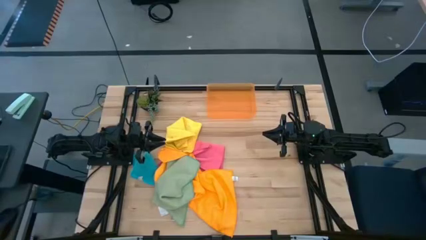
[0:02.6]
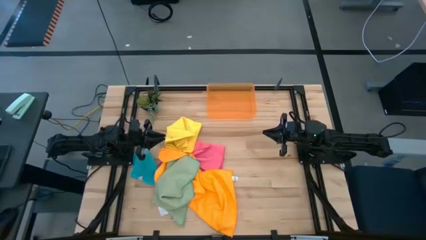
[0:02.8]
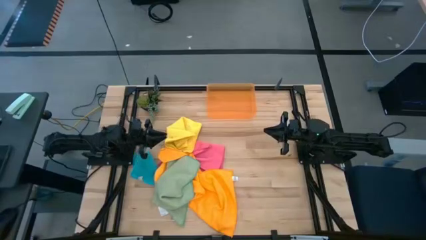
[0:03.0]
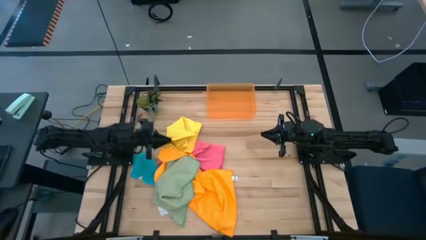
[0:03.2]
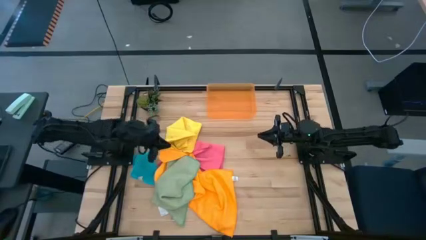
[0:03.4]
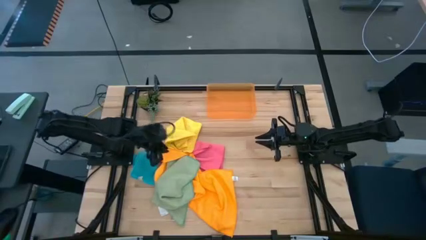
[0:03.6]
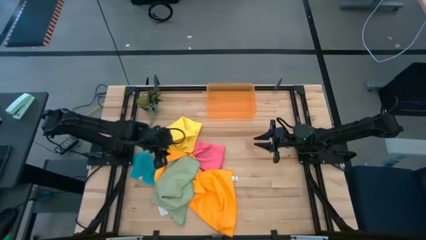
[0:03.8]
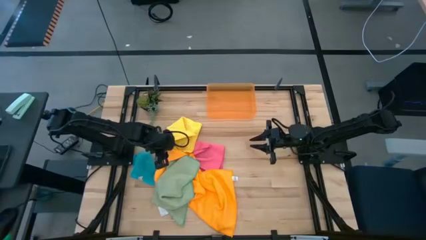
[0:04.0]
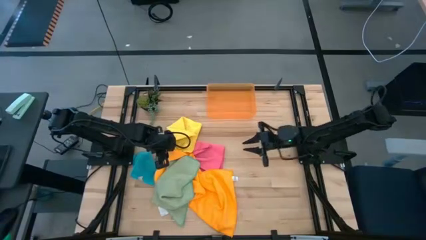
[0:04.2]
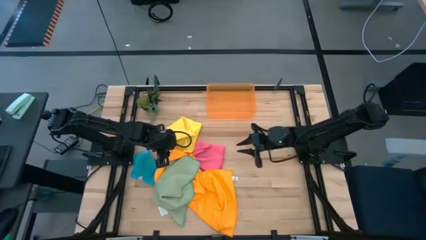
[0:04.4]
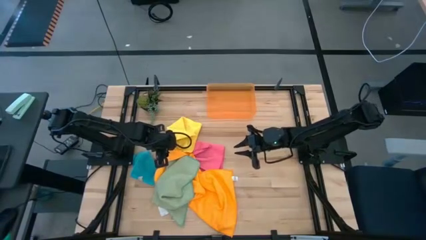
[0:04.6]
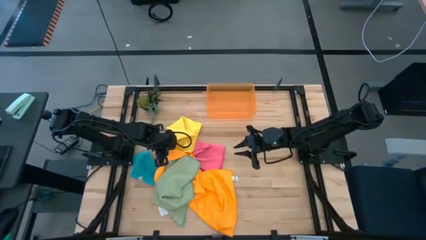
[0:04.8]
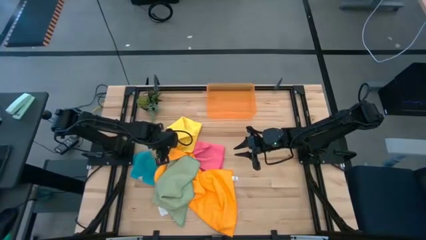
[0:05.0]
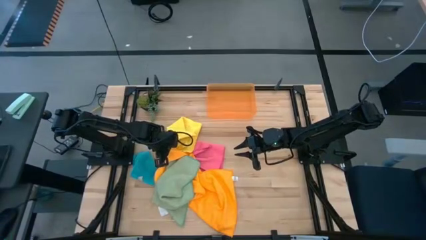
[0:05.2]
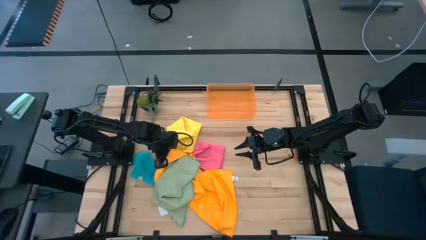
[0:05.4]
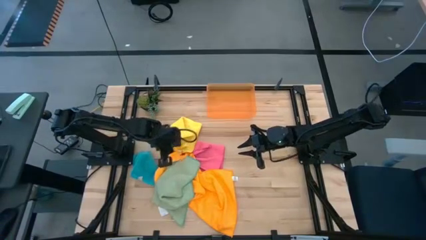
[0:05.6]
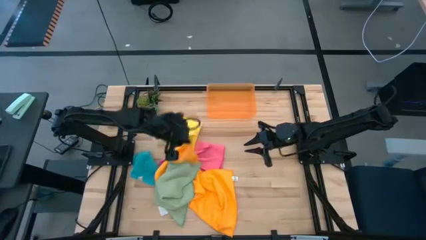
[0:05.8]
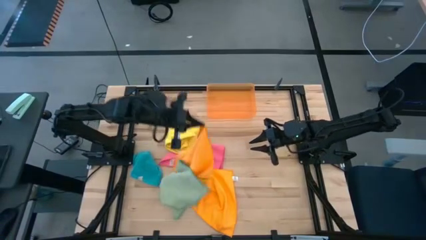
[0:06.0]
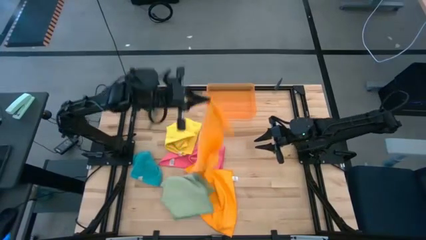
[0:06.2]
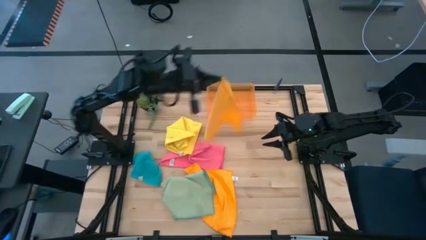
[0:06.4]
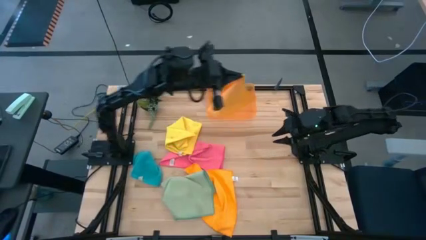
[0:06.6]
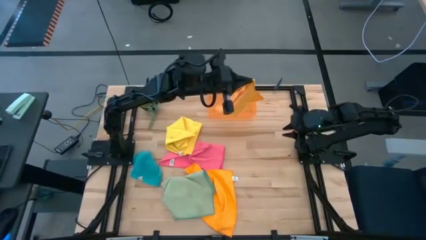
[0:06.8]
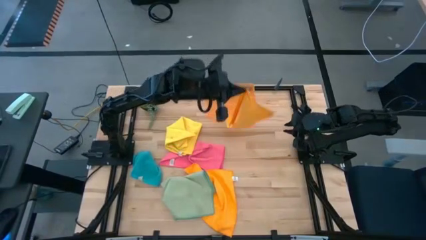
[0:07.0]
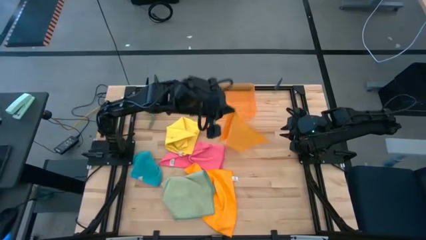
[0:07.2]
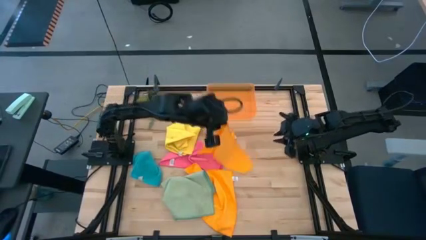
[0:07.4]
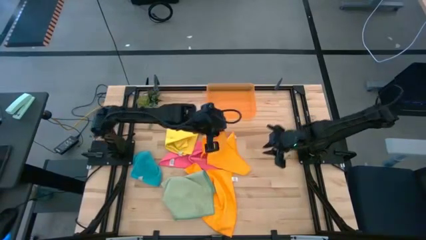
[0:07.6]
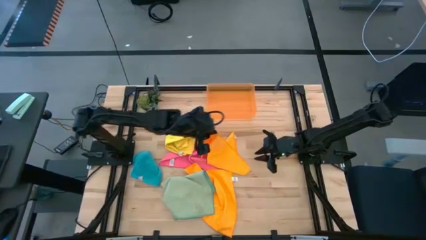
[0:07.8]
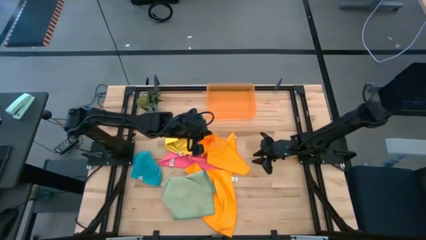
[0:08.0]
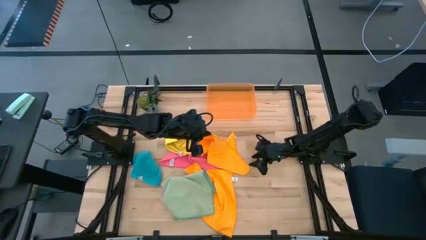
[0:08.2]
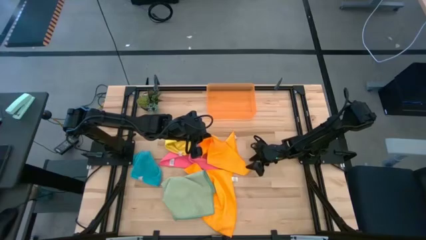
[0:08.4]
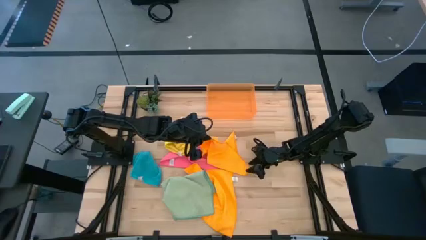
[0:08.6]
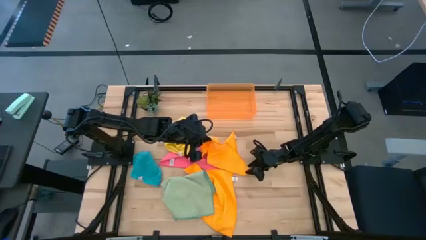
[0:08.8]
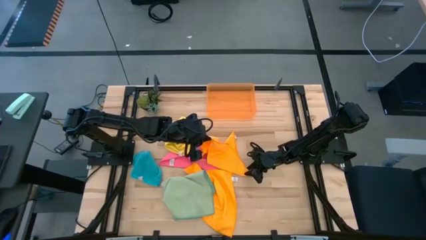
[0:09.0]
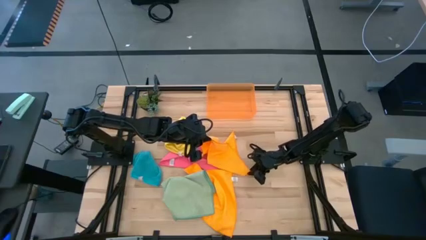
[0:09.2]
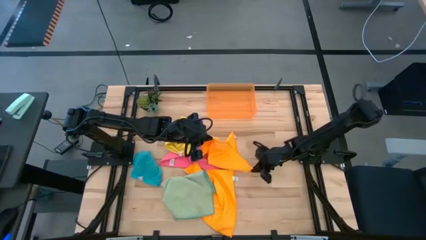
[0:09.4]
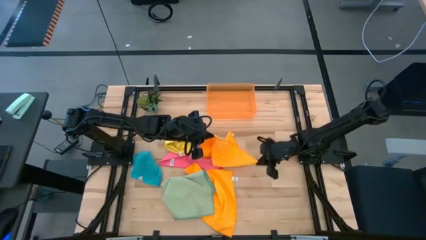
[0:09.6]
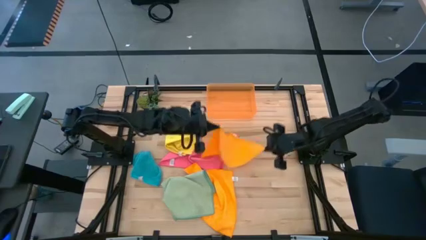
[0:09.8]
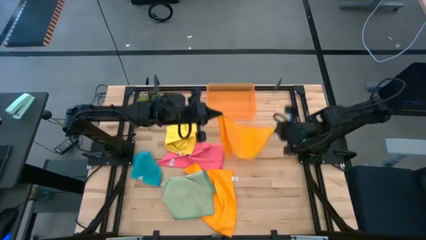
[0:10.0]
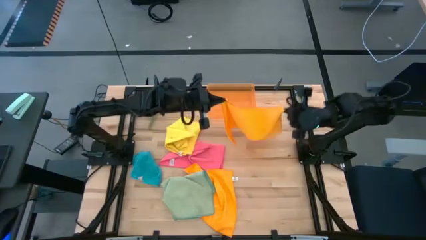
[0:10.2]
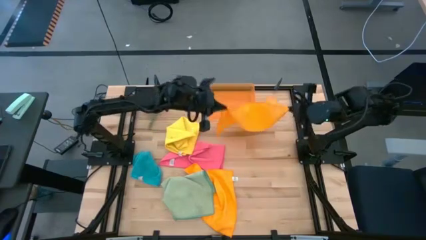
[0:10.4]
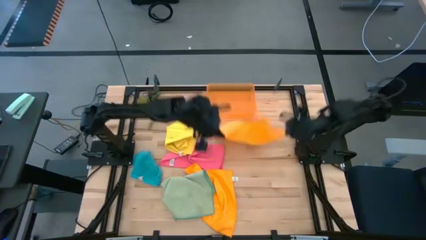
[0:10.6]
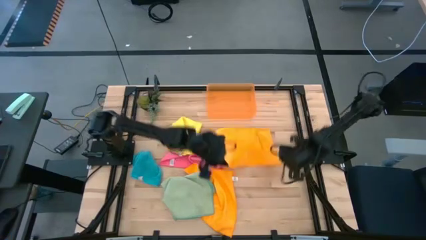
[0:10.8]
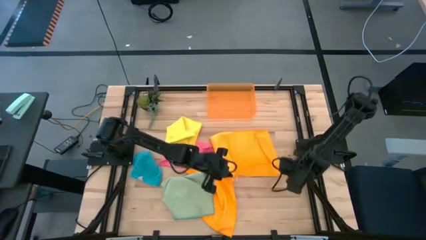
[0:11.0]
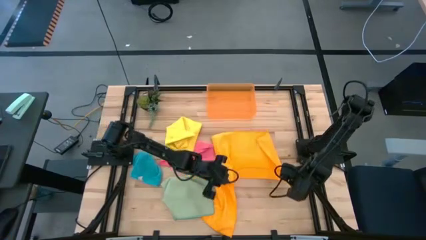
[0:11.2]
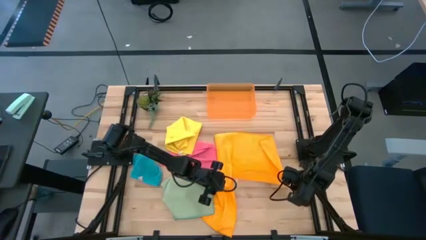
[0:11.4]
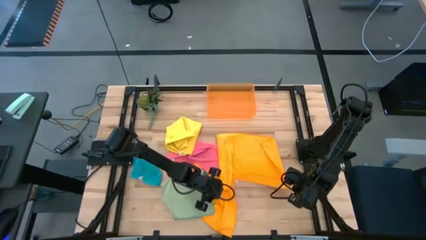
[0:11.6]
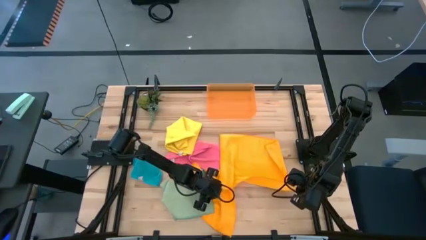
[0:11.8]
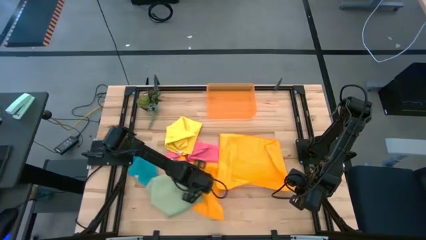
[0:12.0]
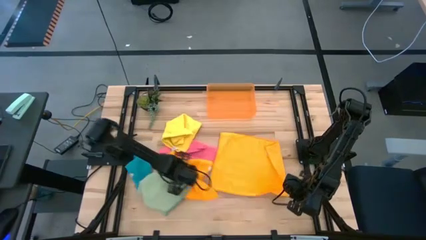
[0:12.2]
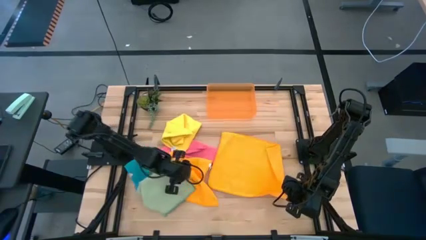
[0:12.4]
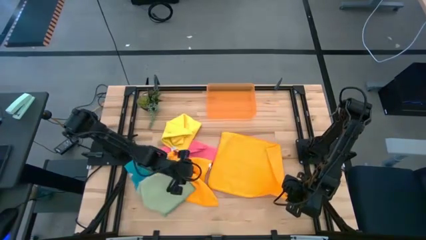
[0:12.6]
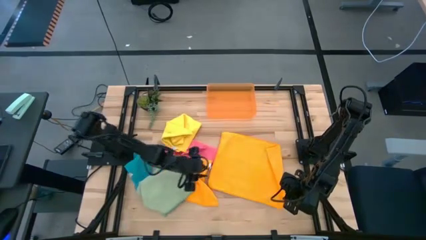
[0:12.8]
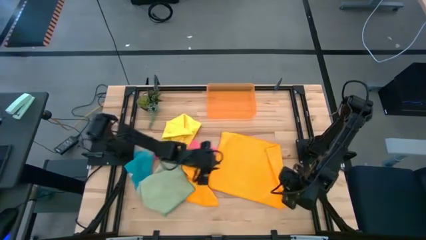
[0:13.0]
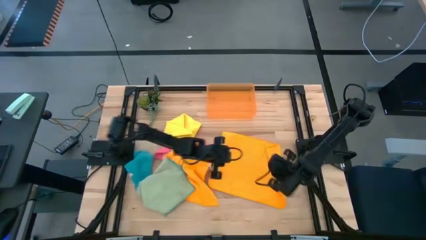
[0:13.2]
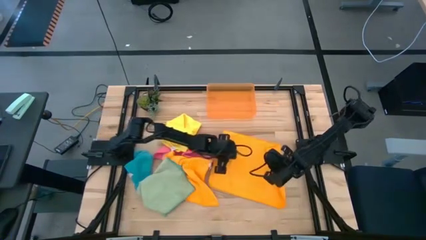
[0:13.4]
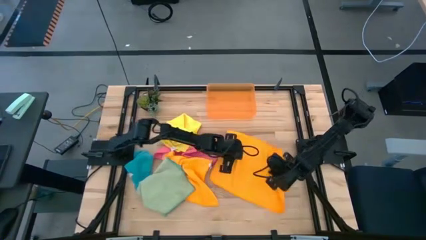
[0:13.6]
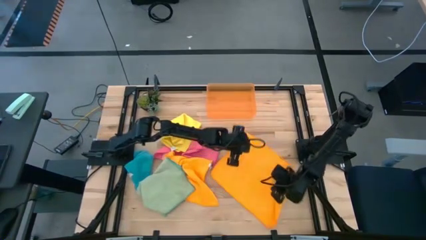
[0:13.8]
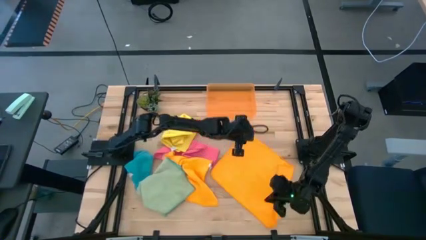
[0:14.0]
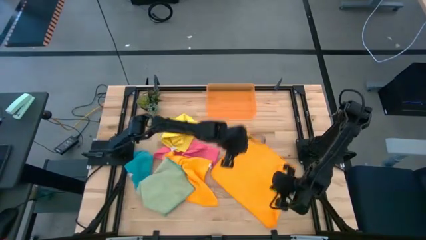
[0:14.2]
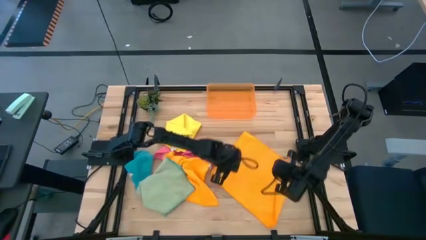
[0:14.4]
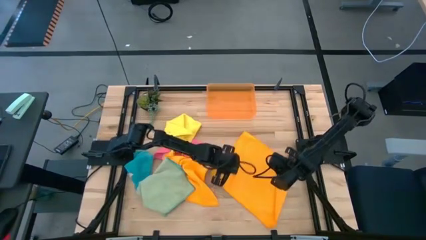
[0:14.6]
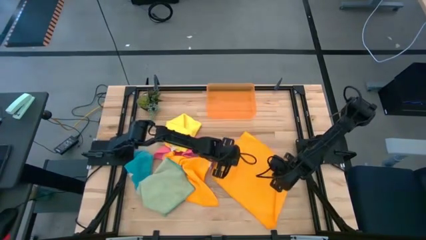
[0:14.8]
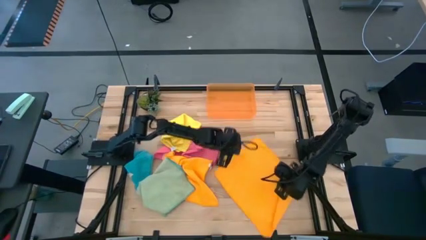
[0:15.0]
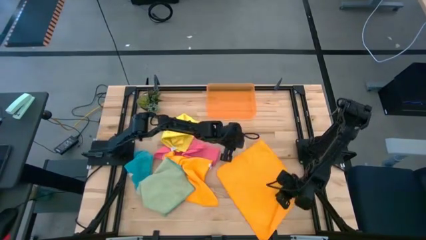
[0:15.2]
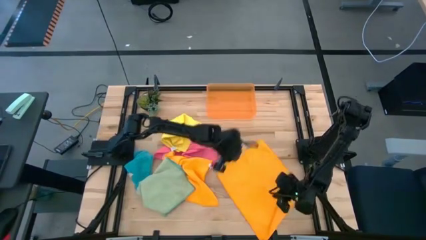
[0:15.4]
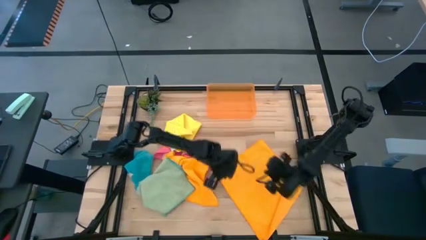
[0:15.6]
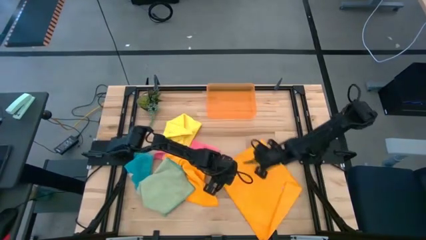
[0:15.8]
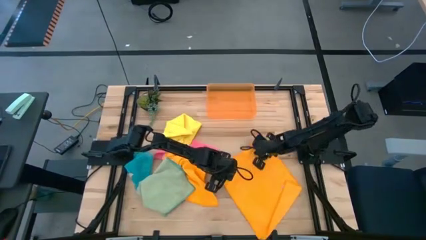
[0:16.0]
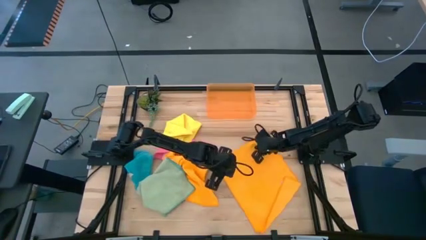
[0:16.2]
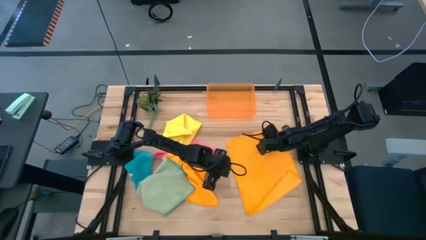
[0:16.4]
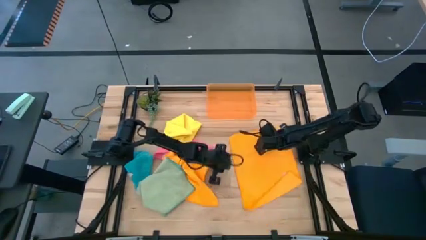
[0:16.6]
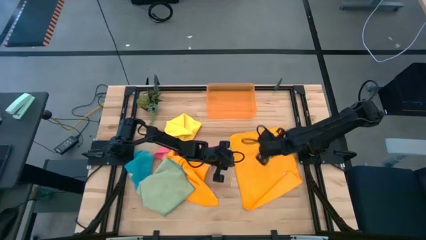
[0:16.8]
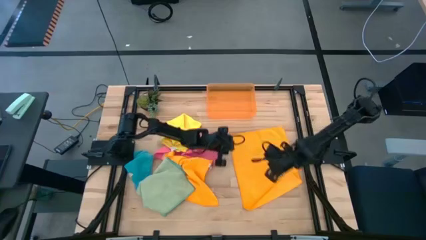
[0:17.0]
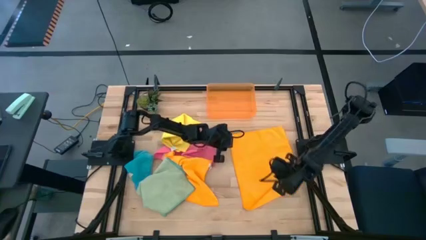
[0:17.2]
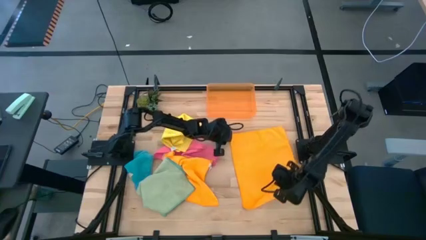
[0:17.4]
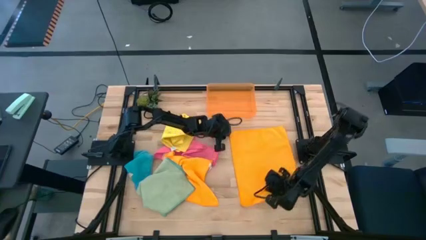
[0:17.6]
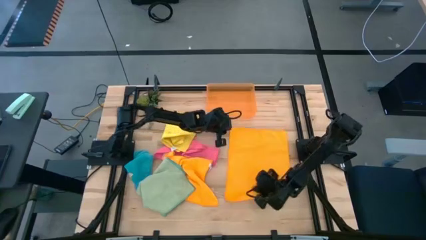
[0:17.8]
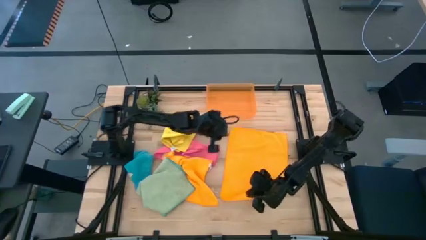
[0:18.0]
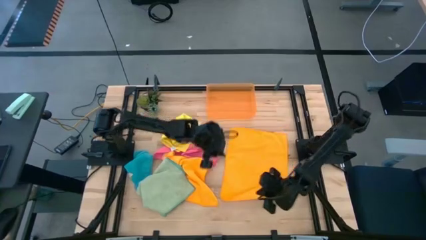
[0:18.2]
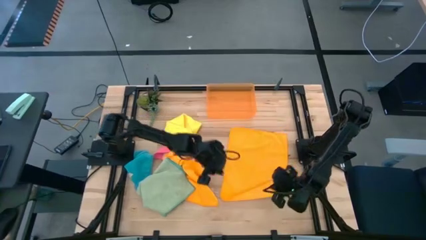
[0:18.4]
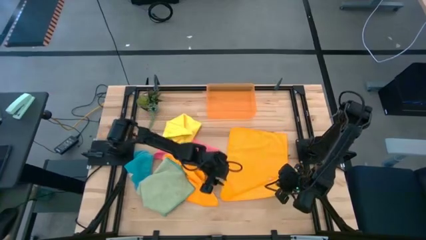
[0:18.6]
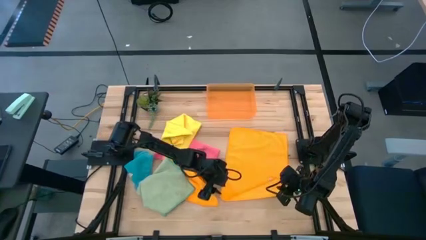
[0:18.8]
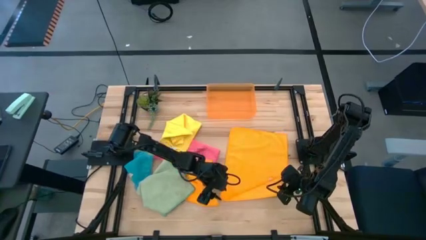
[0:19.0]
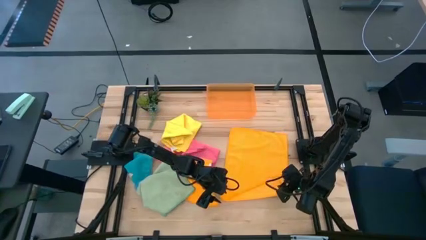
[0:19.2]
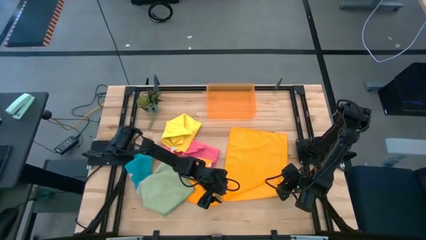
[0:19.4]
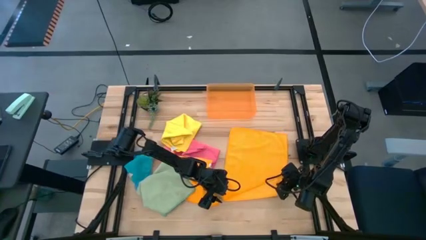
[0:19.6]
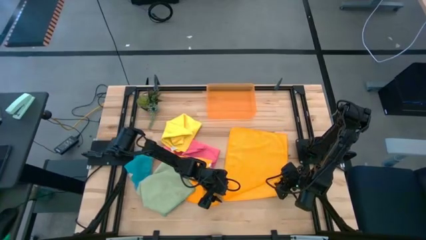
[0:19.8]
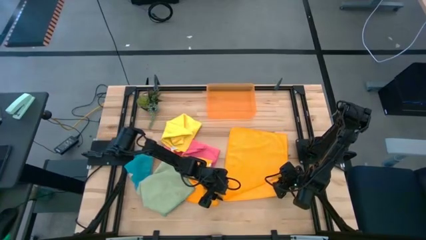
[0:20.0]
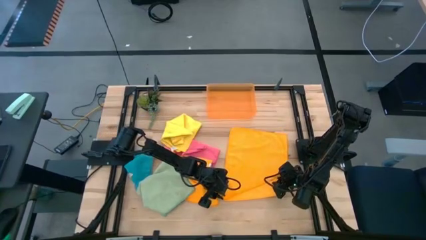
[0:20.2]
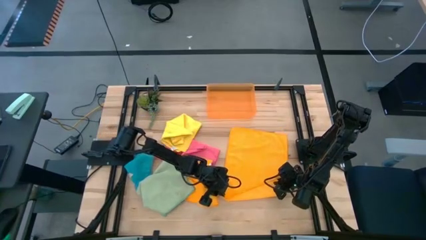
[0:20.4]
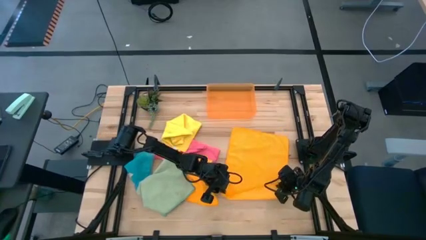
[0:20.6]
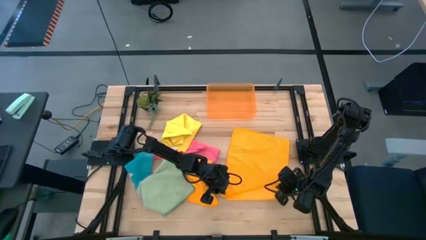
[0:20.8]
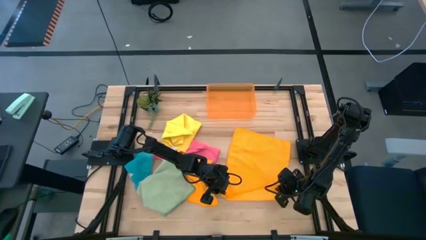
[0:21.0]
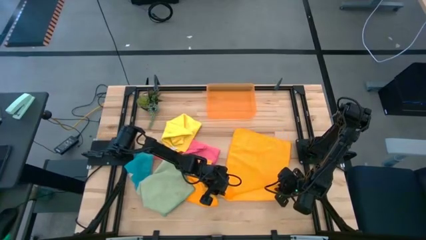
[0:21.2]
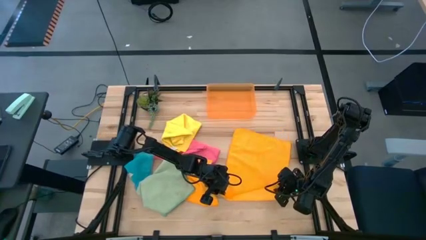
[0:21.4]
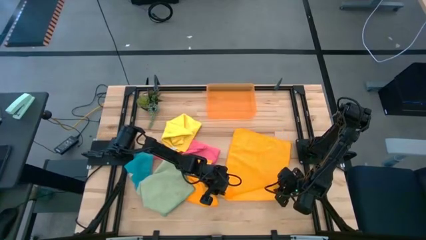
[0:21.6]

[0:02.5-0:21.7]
Task: Fold microfiber towels
Fold the left orange microfiber cloth
